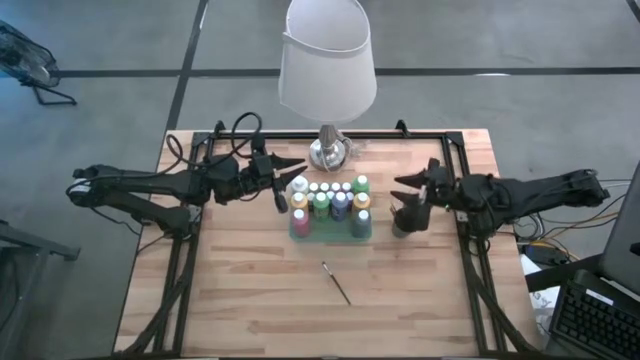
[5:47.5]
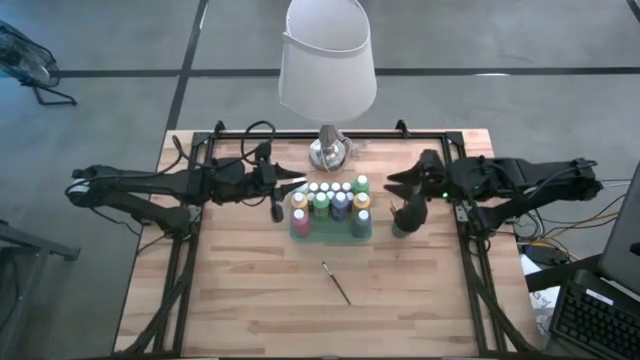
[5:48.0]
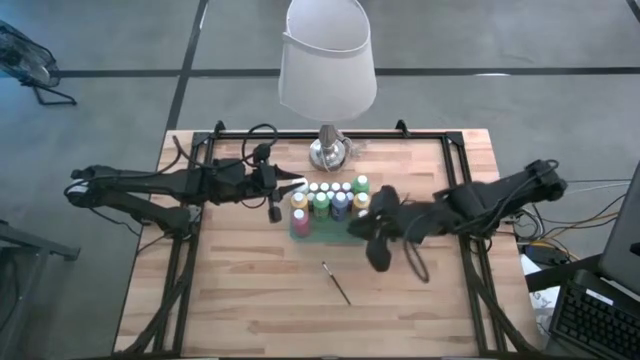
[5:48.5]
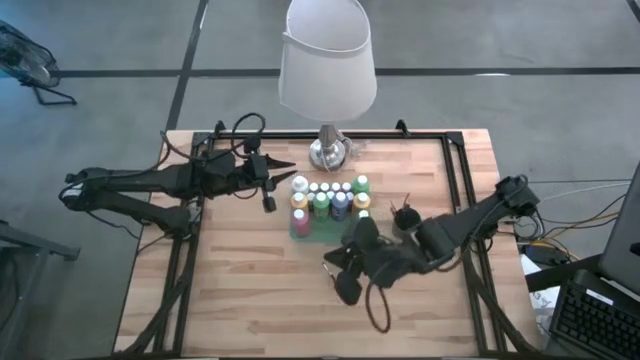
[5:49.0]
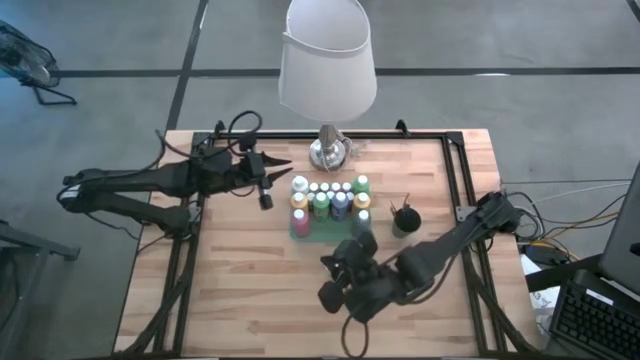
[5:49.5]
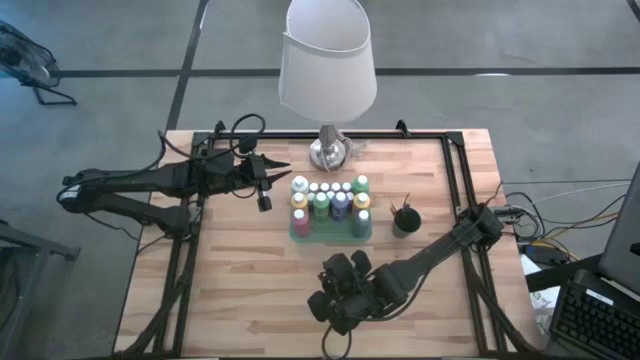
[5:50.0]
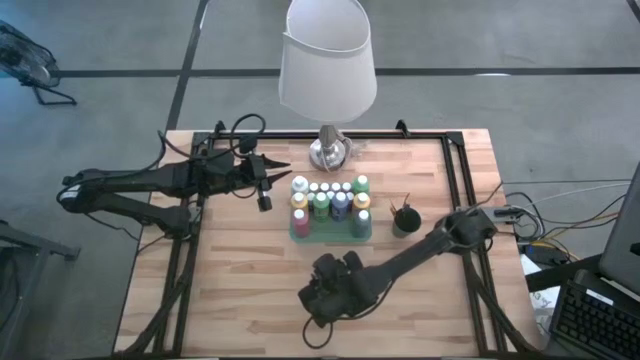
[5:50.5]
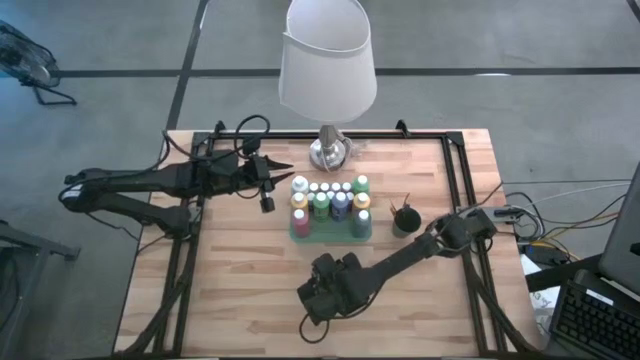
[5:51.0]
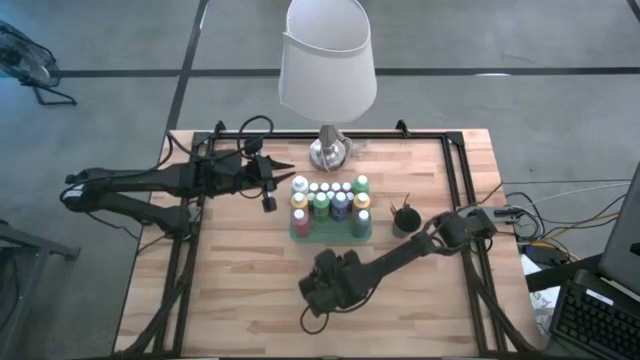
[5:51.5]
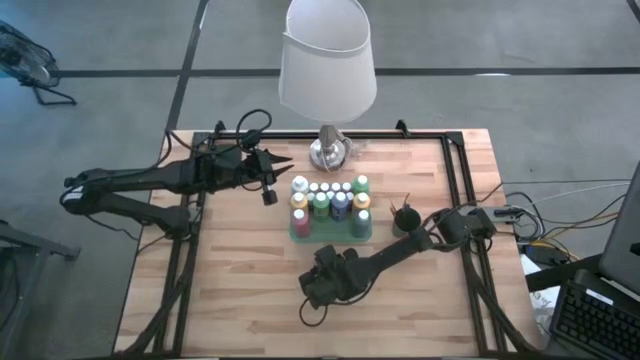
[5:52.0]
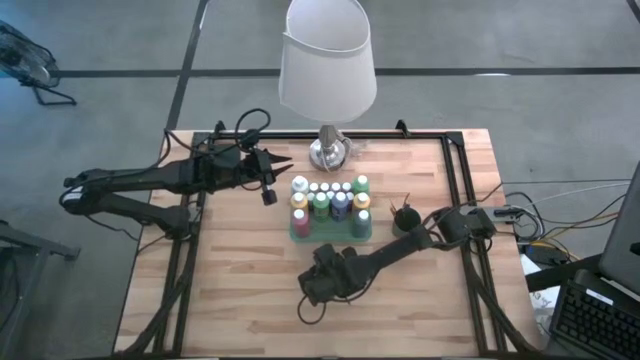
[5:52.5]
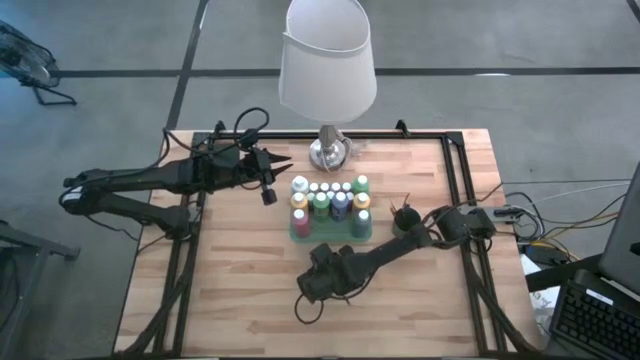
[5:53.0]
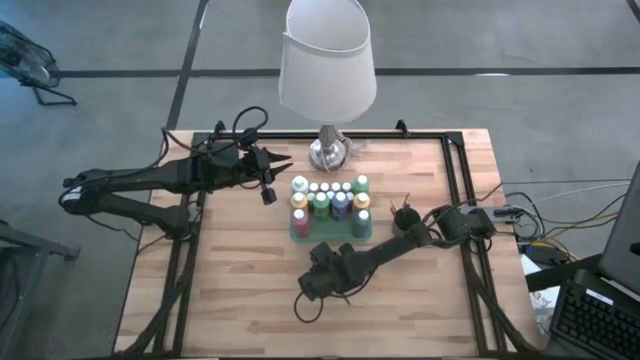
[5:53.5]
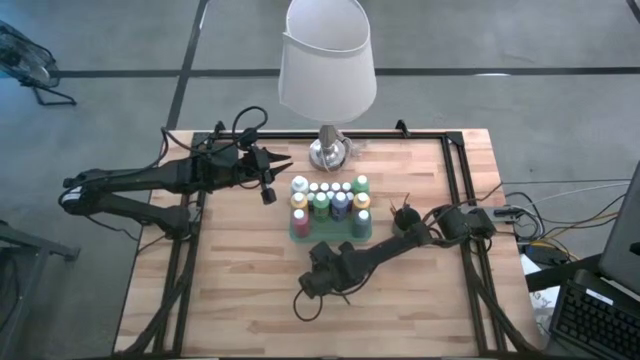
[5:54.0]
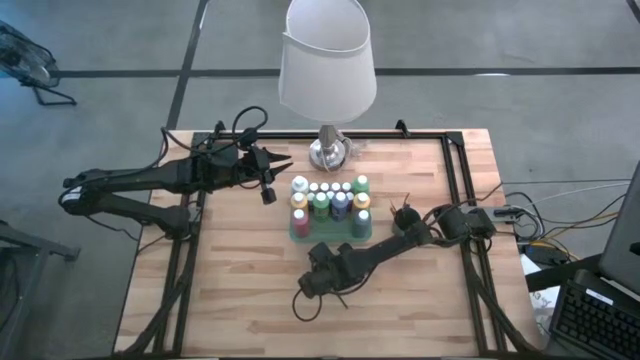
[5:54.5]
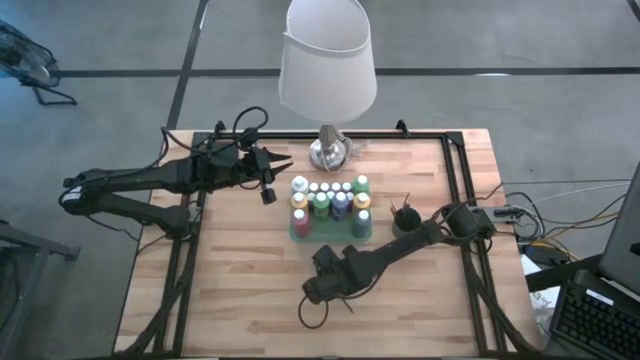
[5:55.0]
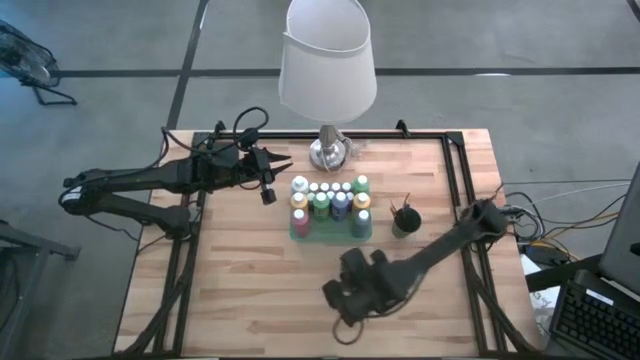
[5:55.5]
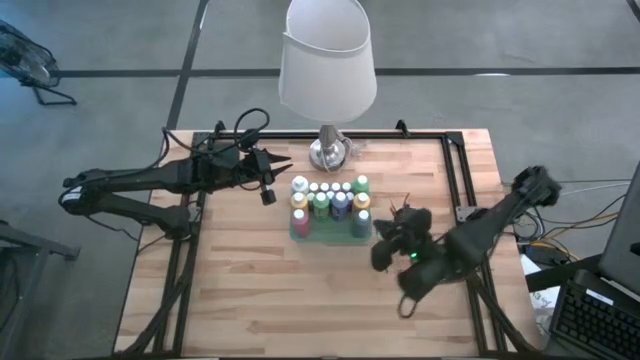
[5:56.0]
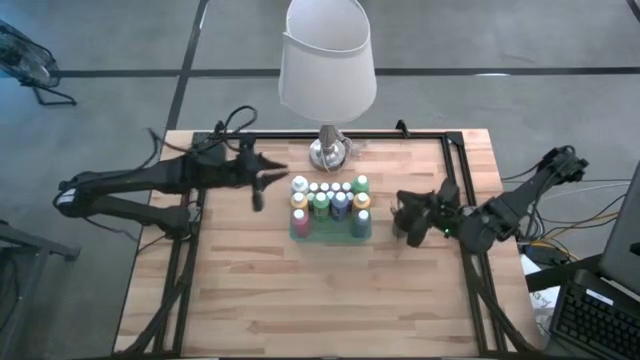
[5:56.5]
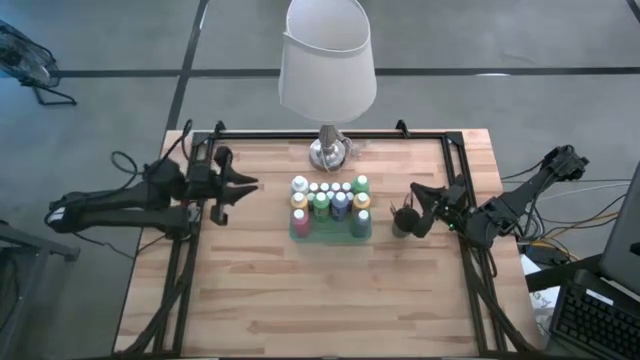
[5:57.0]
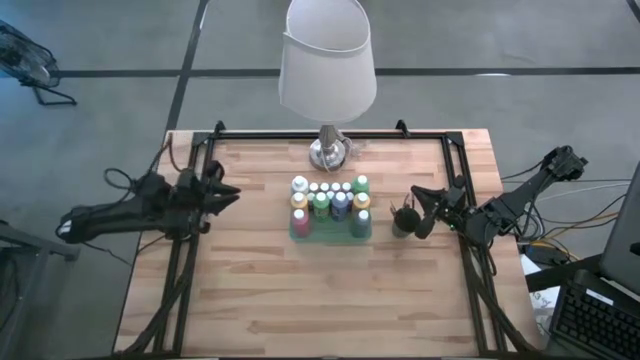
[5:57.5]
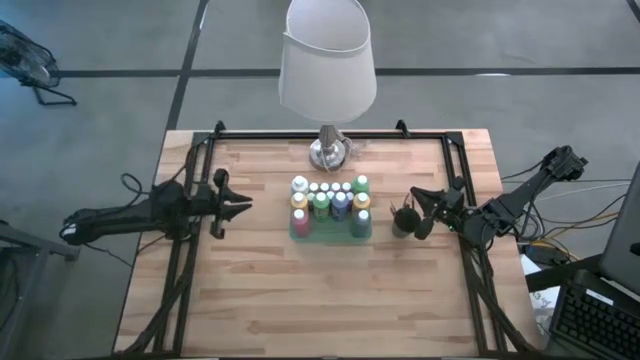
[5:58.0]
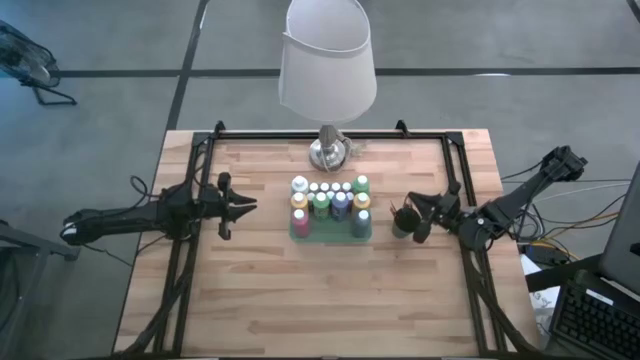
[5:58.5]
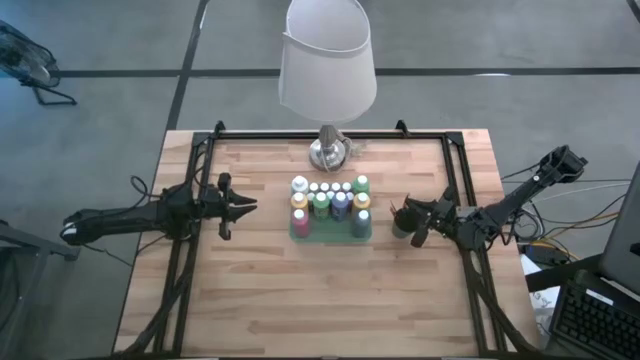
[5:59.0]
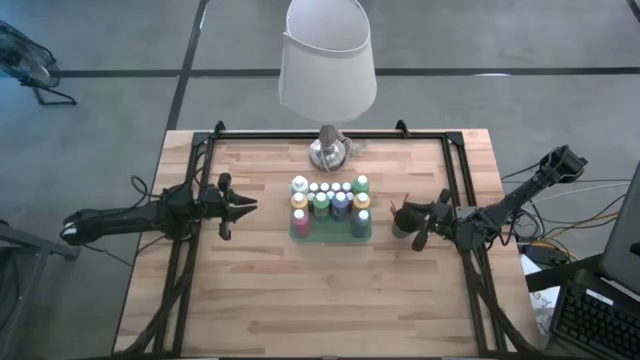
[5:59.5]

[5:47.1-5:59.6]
Task: Pick & Place Paint Supplies
Put the black paint brush into the black cup

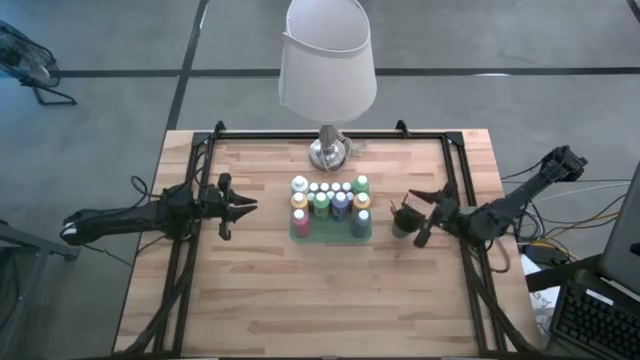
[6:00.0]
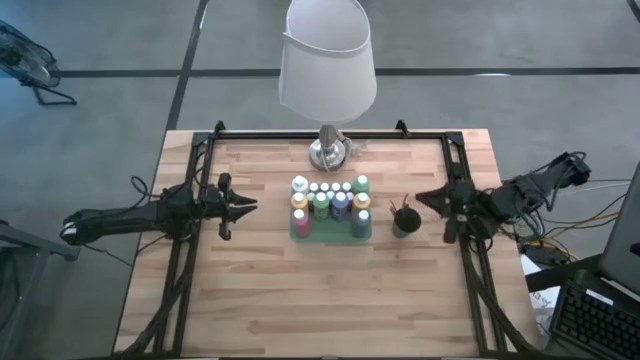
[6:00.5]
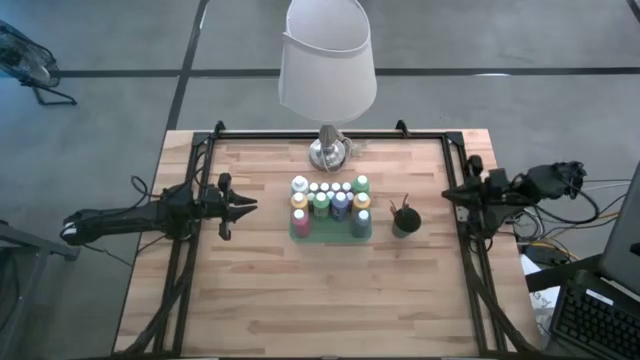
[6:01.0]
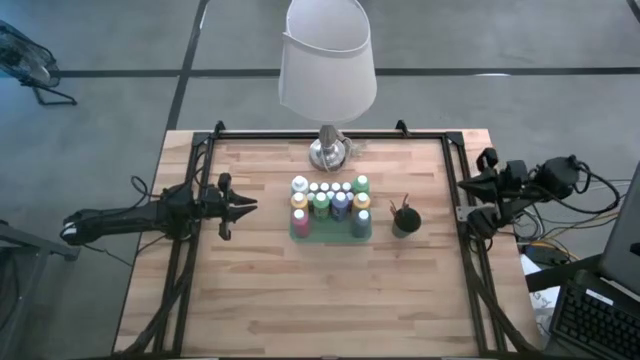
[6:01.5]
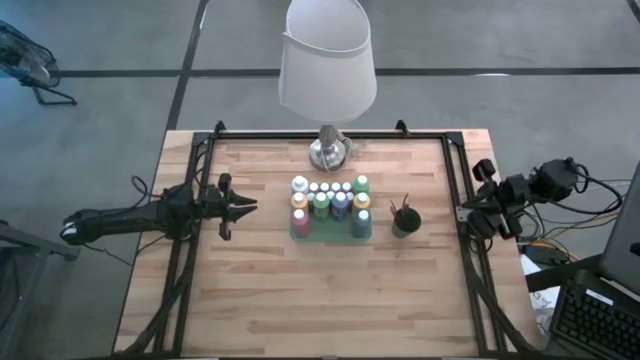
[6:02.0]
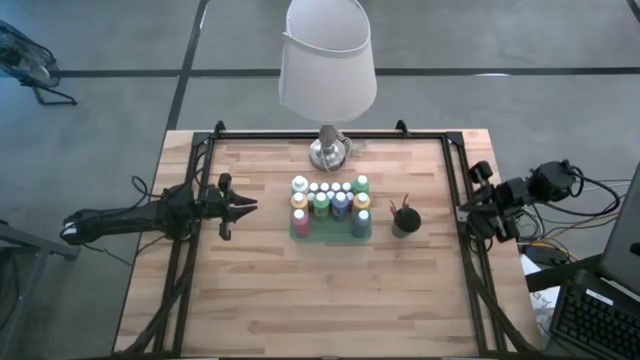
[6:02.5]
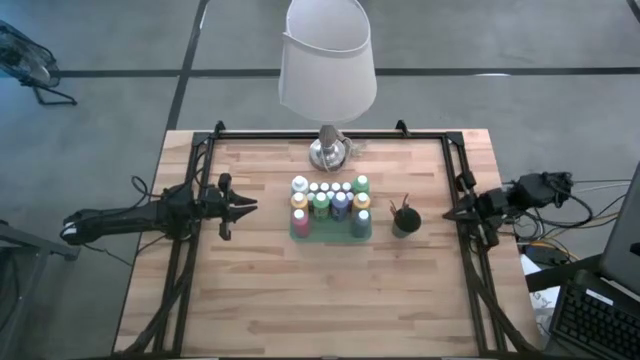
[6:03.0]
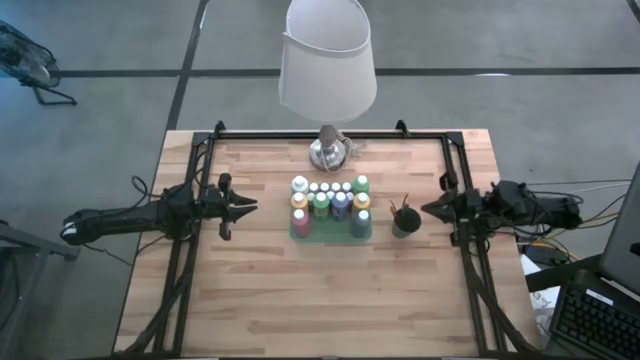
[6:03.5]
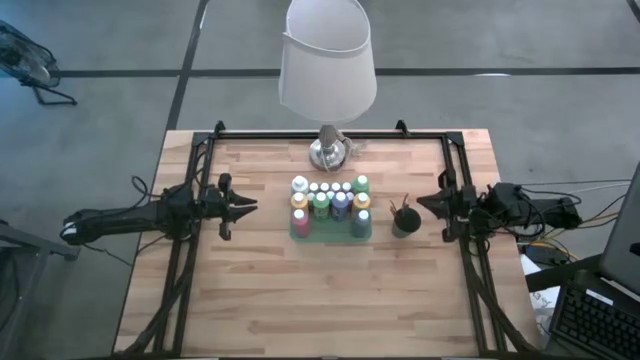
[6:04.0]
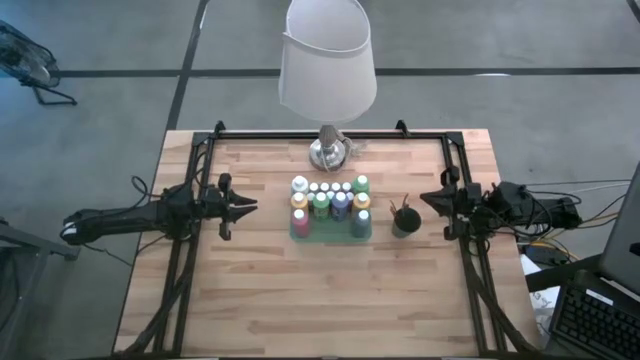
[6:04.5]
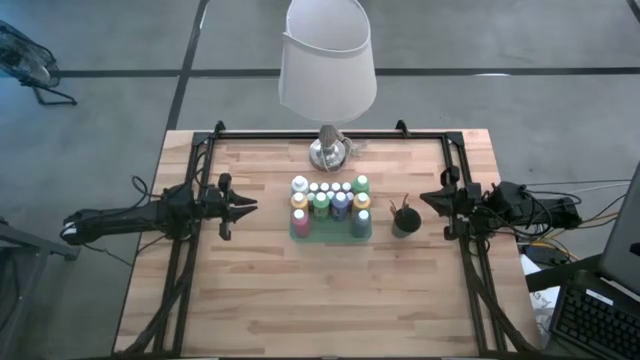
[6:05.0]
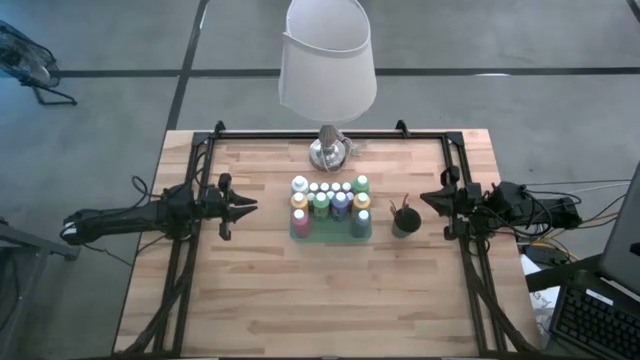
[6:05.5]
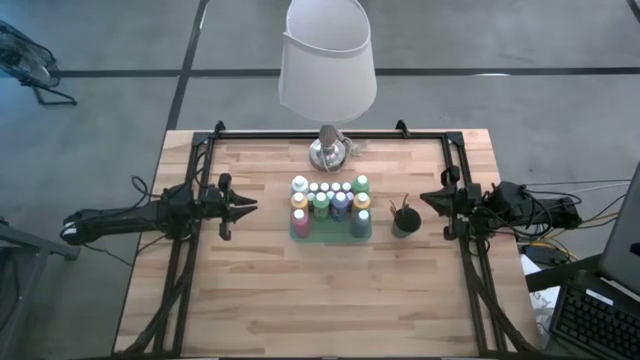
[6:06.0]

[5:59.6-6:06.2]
Return to Home Position

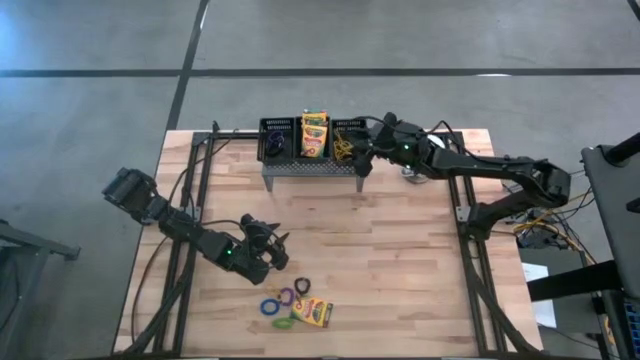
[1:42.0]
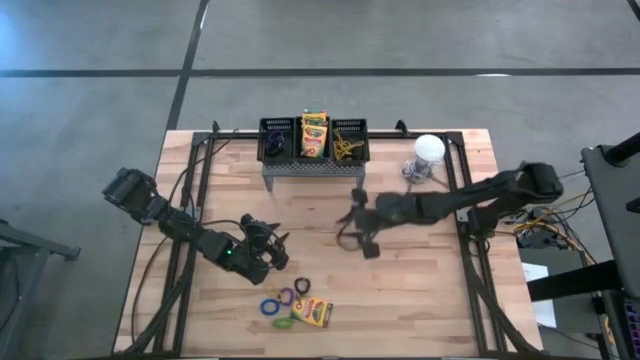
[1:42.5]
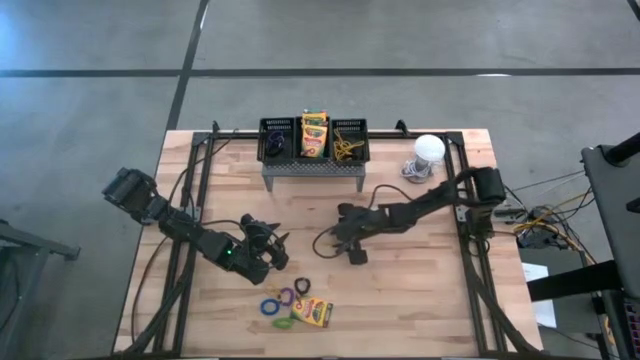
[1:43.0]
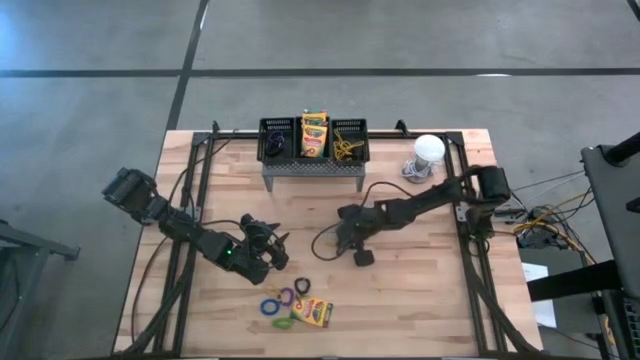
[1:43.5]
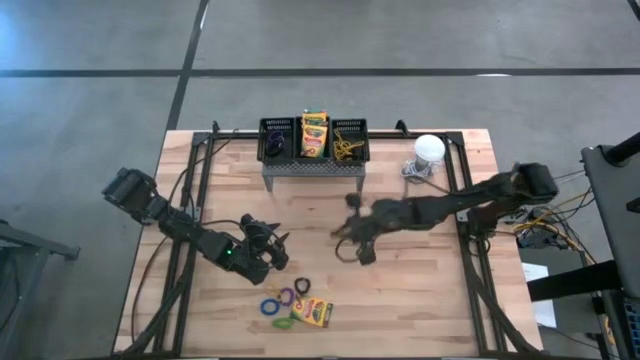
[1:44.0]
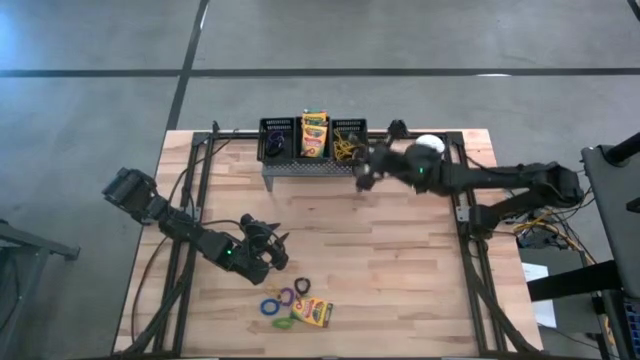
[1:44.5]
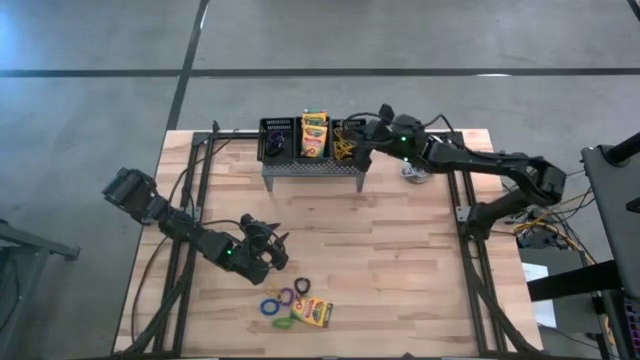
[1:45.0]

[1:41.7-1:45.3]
Task: Pick & Place Office Desk Supplies
Put the yellow rubber band into the right black basket on the shelf
